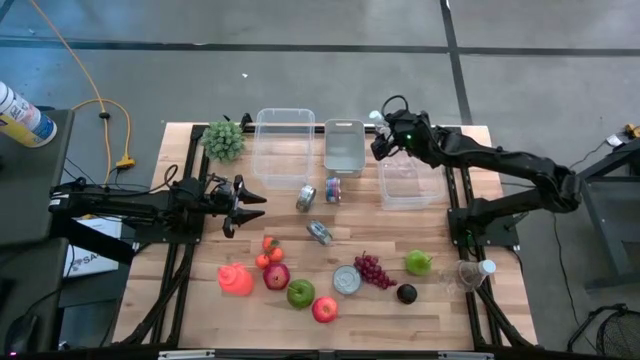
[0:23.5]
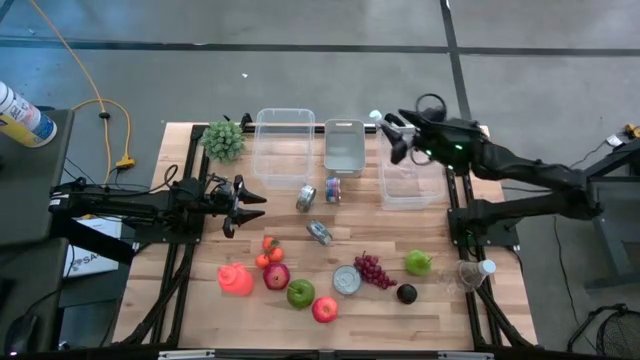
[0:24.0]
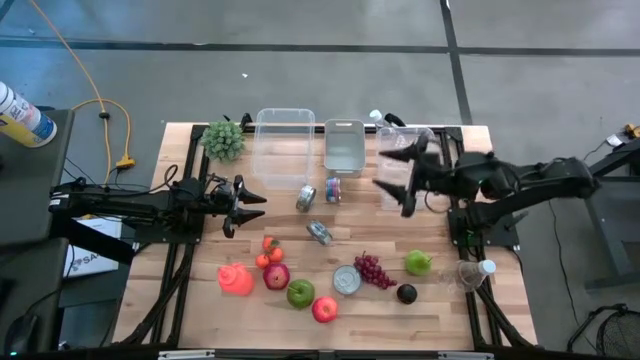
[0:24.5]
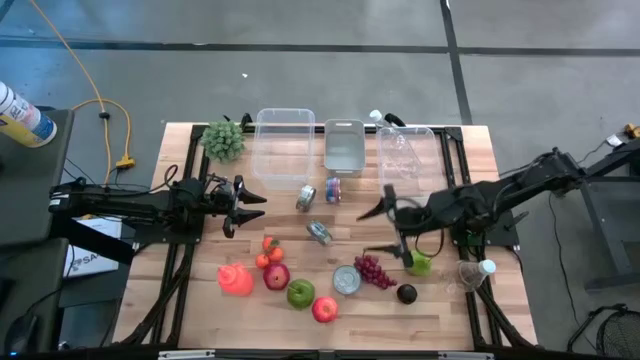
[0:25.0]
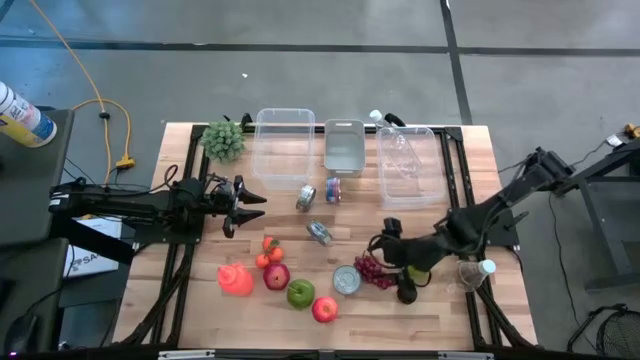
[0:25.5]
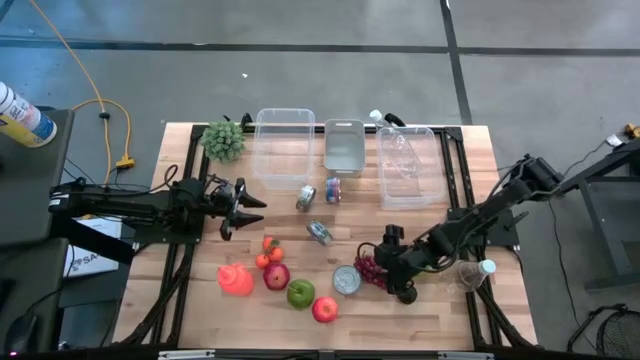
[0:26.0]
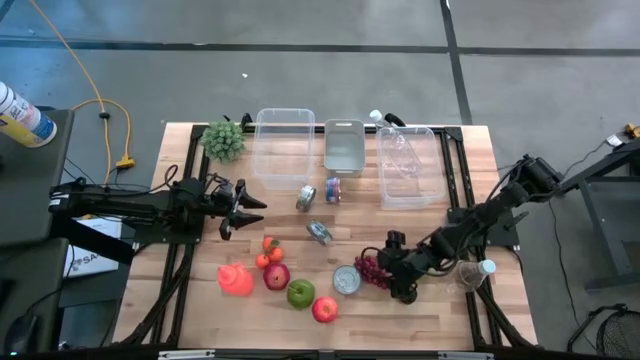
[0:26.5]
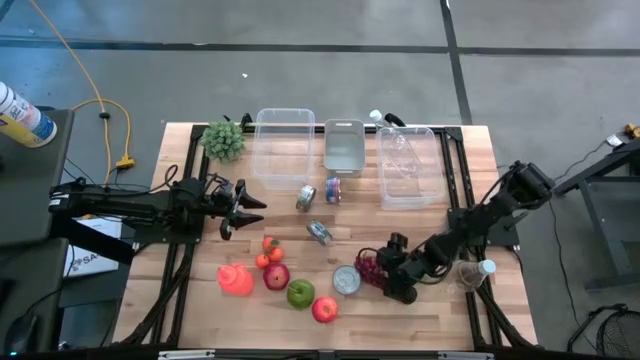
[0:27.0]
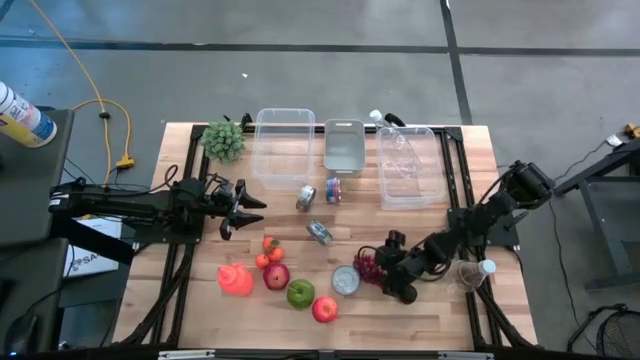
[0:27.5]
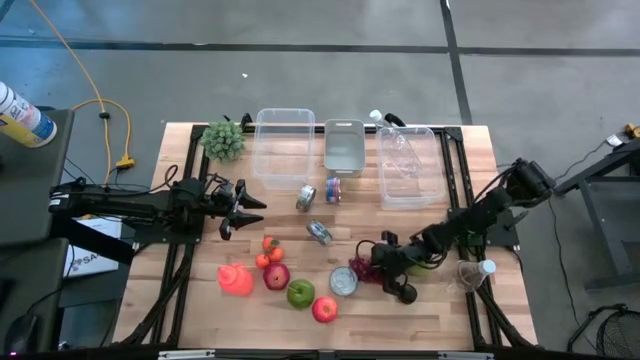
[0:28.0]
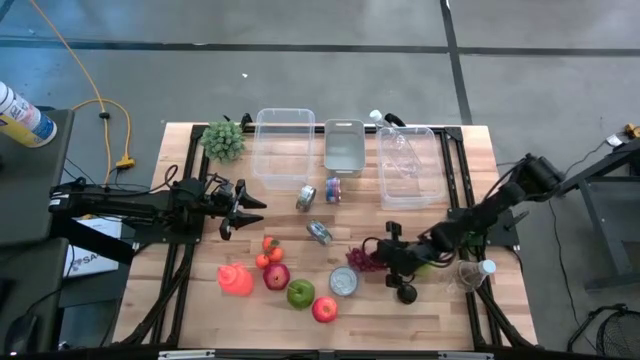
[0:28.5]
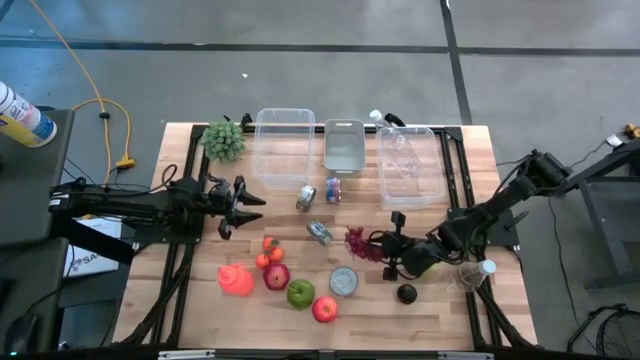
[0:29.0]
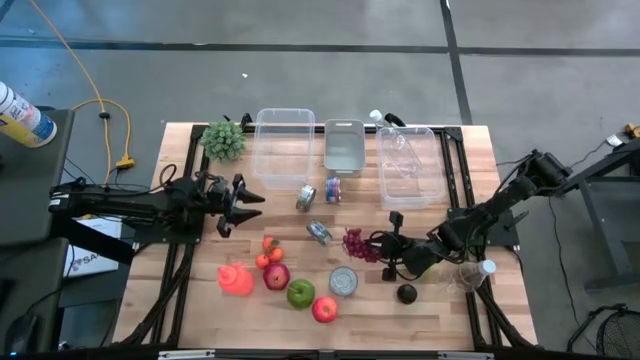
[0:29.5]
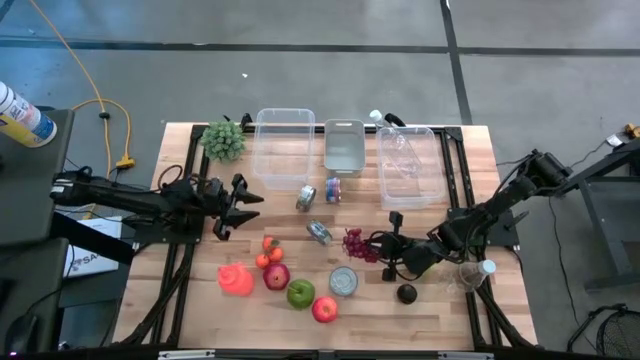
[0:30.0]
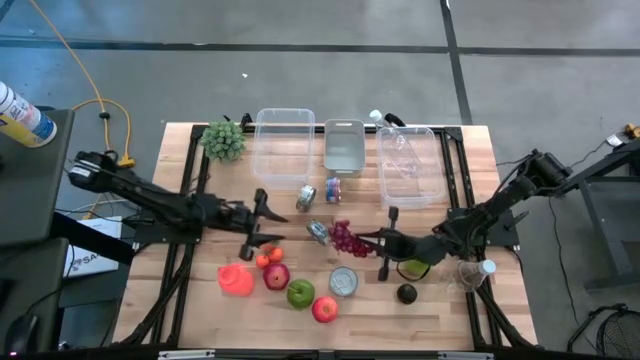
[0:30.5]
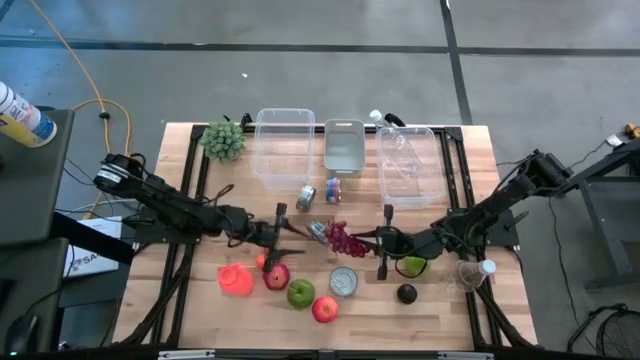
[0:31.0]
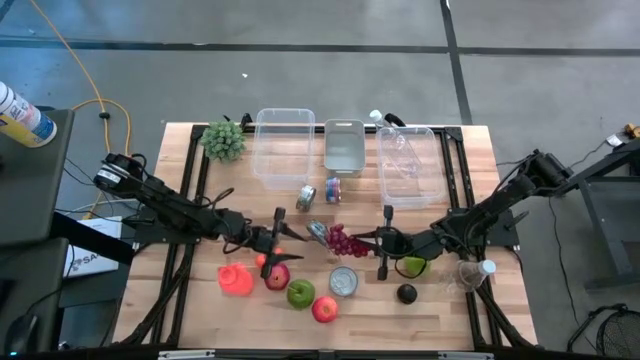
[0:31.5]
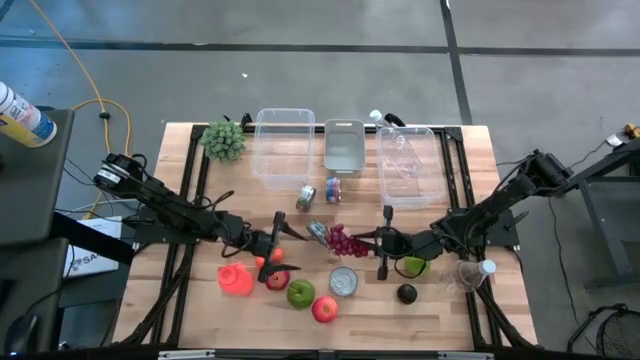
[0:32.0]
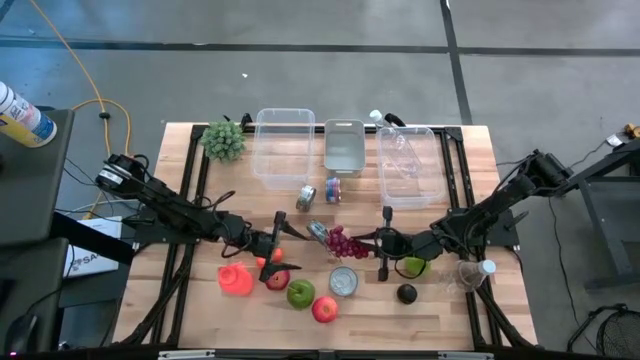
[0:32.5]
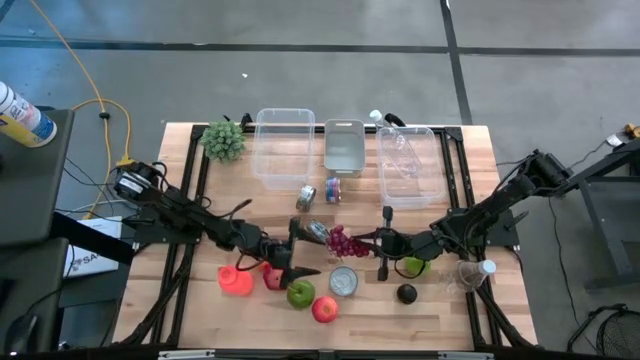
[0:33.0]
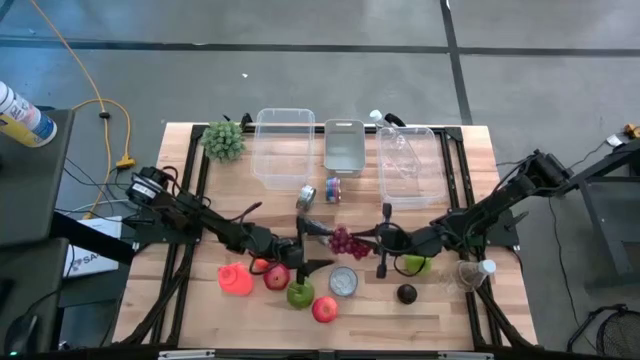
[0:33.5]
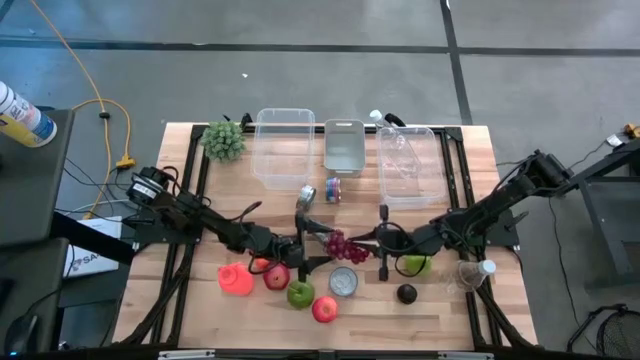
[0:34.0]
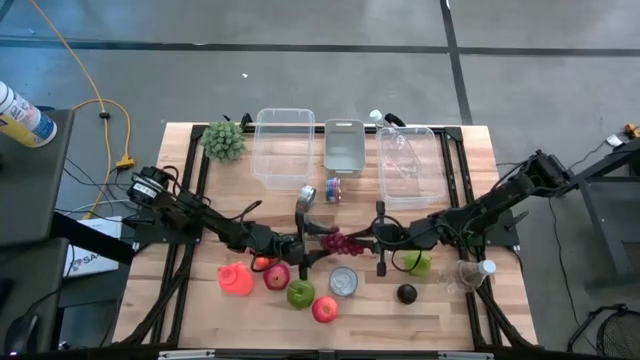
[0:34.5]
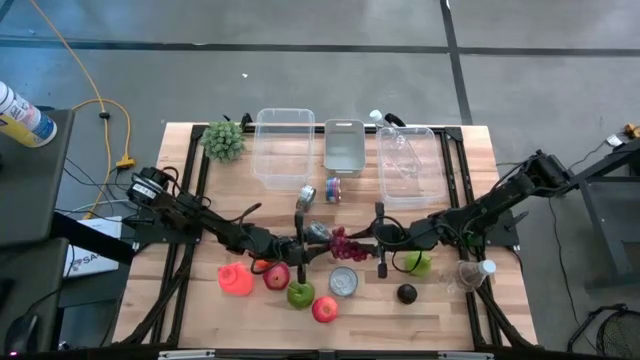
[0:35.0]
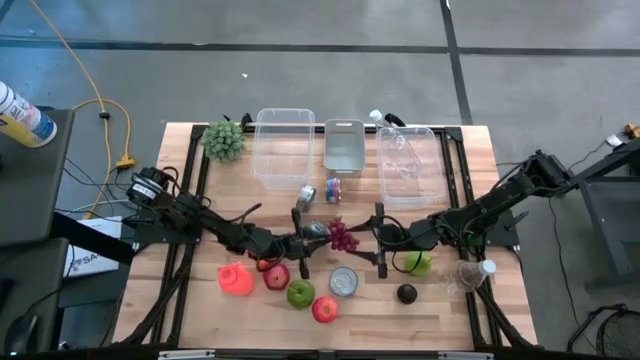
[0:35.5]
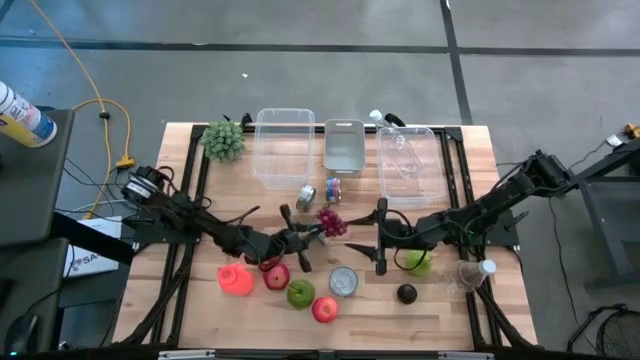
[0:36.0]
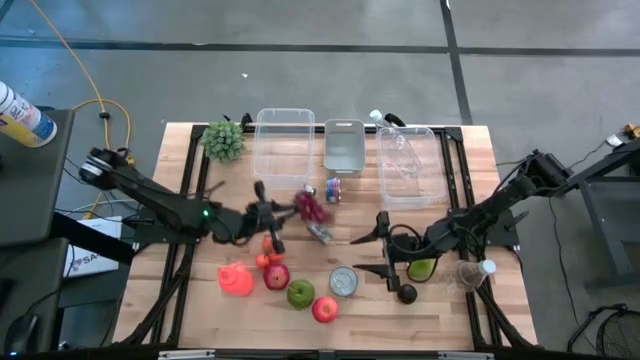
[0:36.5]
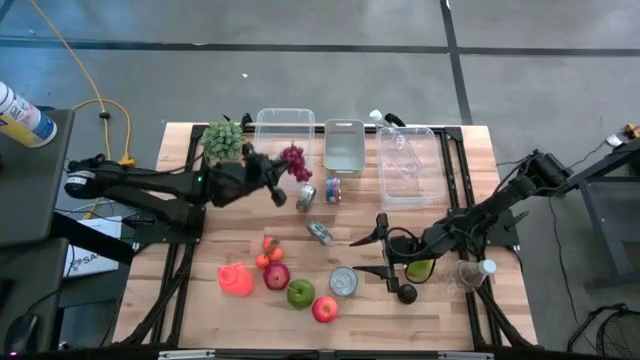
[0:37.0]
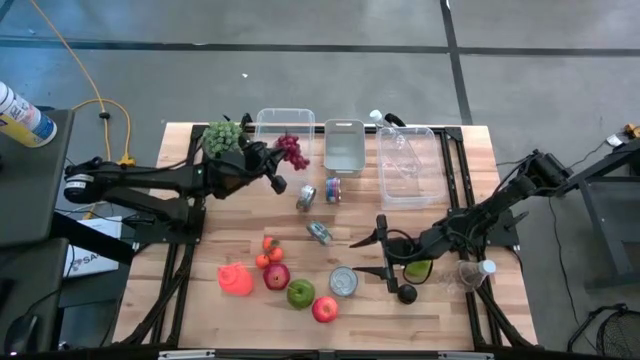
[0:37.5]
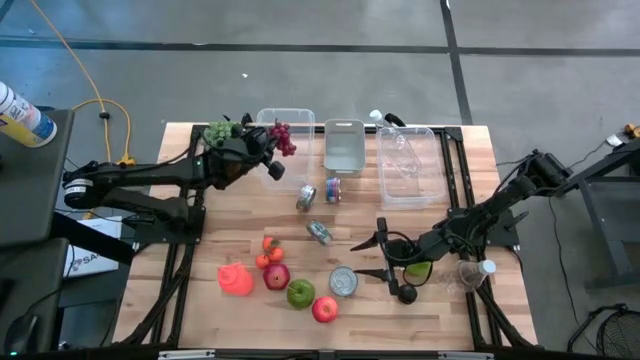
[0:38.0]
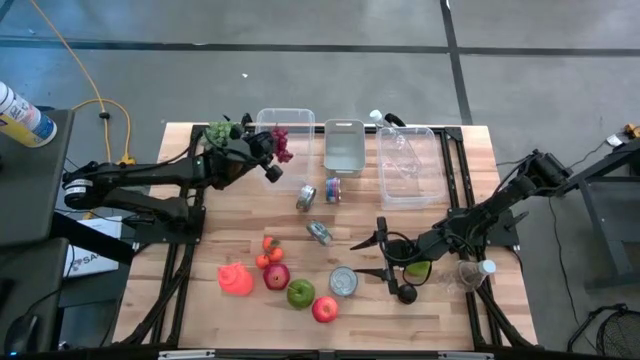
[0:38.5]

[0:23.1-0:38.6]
Task: Pick & Place Food Item
Put the red grapes into the left transparent bin
